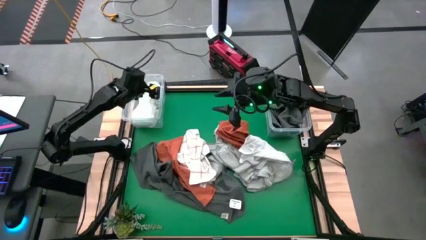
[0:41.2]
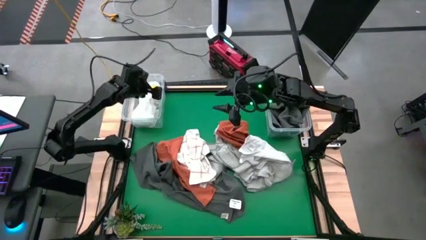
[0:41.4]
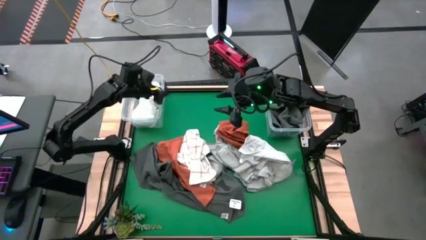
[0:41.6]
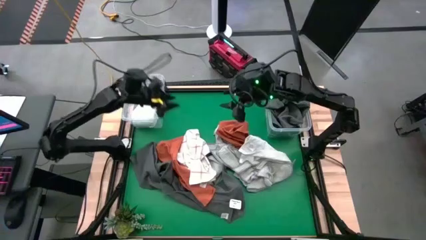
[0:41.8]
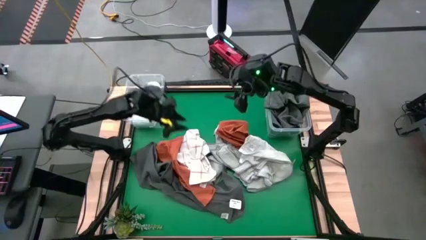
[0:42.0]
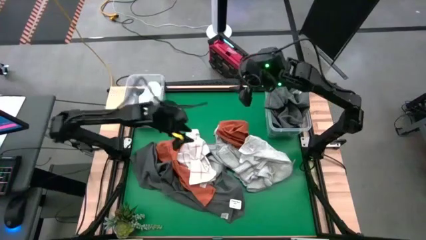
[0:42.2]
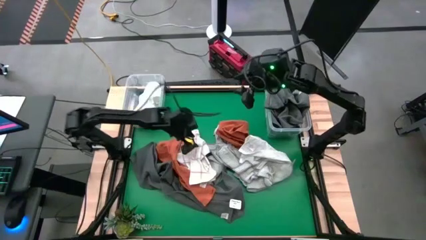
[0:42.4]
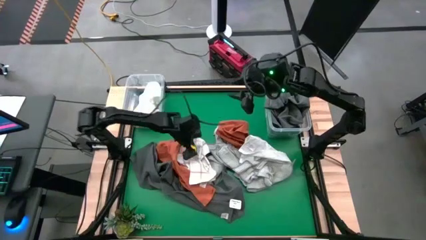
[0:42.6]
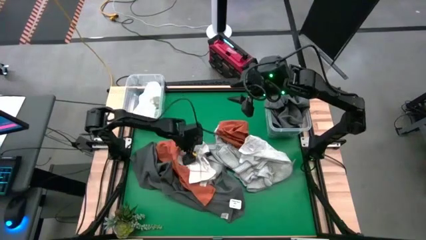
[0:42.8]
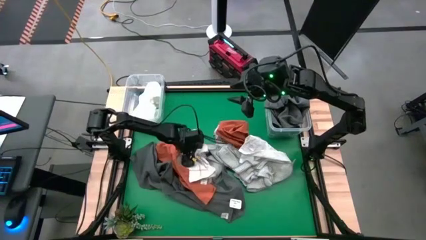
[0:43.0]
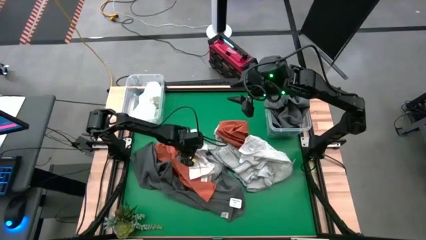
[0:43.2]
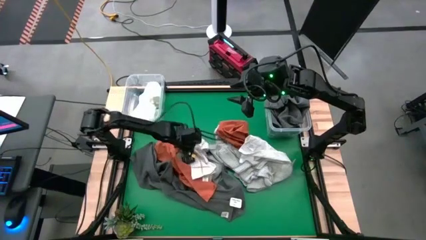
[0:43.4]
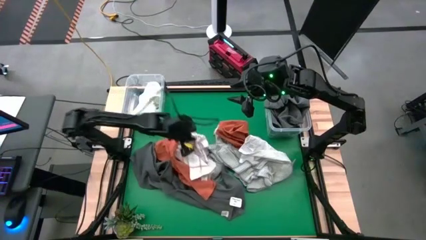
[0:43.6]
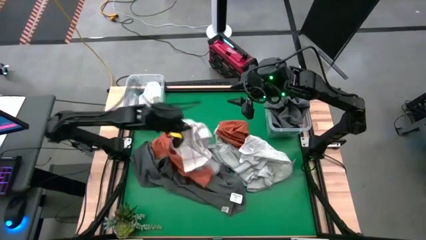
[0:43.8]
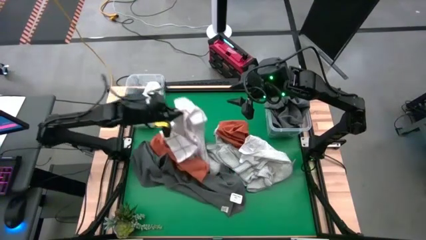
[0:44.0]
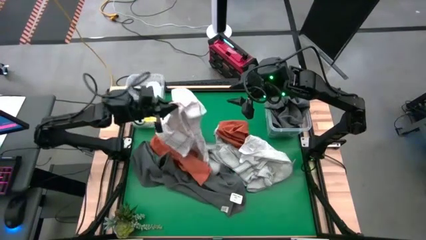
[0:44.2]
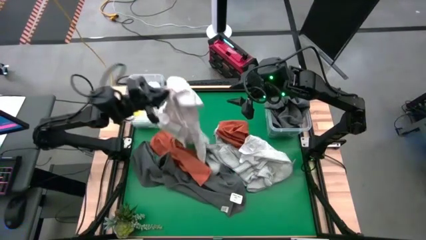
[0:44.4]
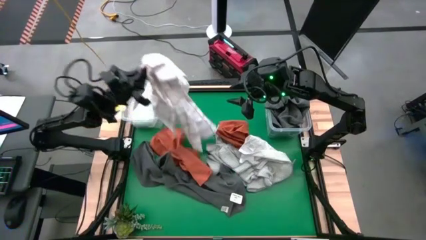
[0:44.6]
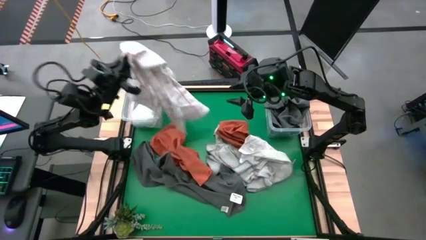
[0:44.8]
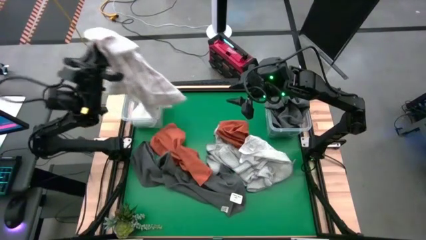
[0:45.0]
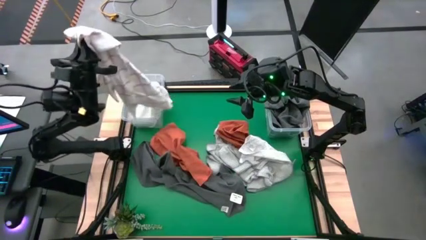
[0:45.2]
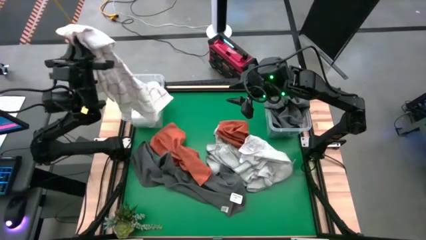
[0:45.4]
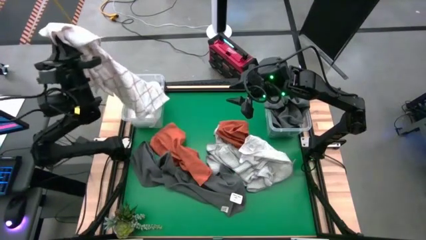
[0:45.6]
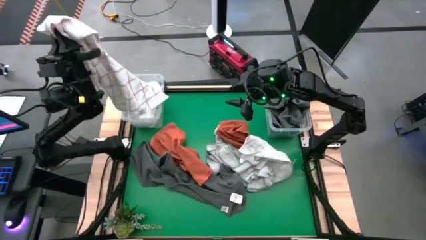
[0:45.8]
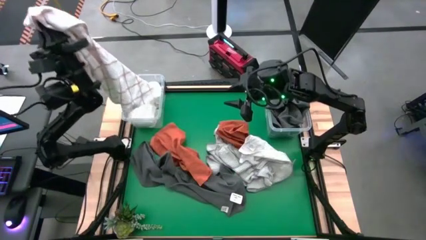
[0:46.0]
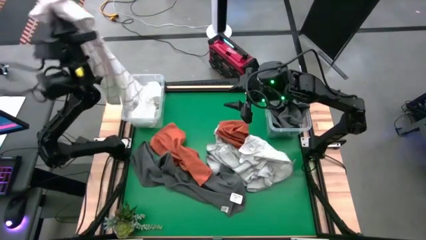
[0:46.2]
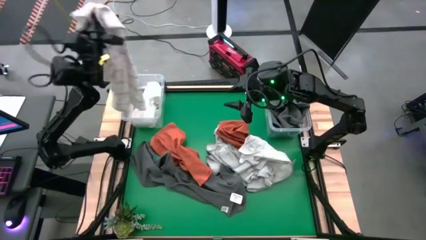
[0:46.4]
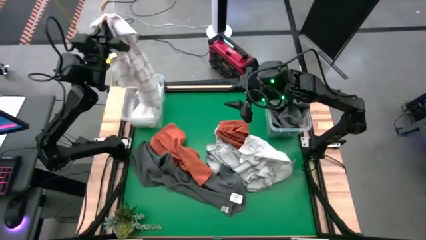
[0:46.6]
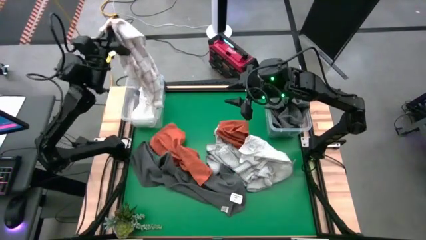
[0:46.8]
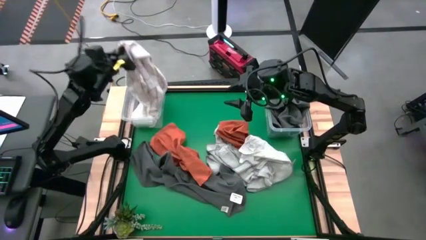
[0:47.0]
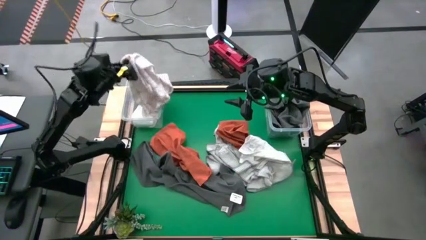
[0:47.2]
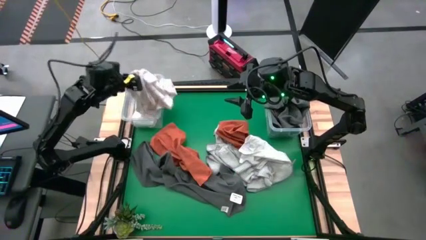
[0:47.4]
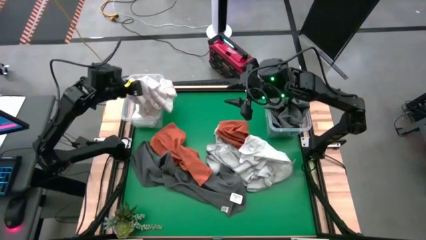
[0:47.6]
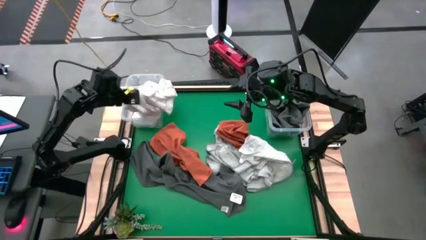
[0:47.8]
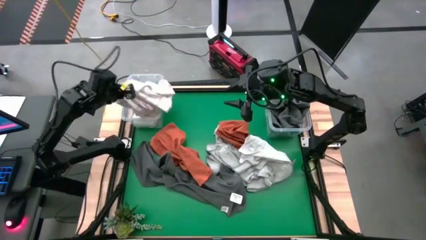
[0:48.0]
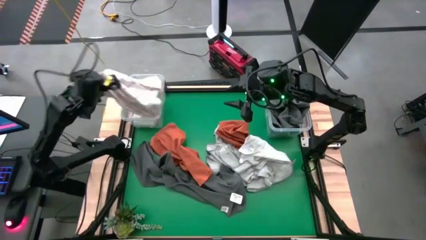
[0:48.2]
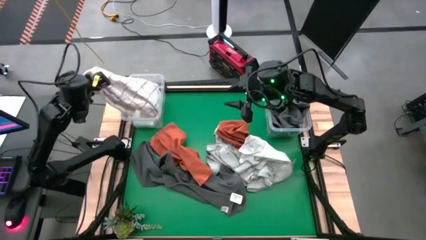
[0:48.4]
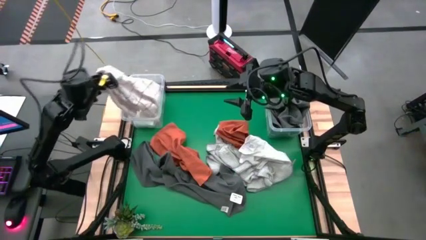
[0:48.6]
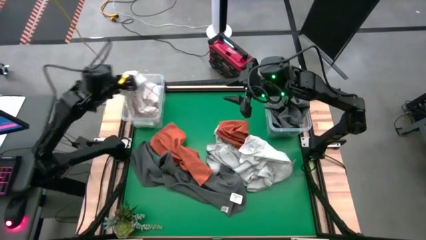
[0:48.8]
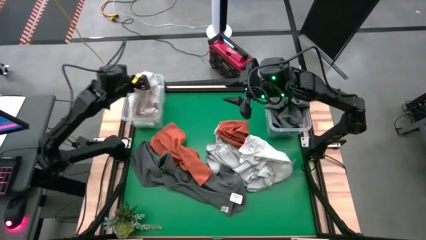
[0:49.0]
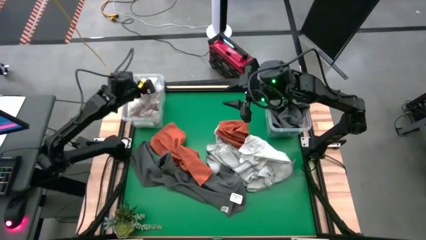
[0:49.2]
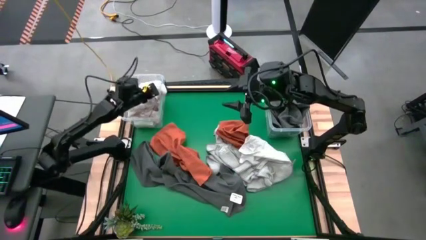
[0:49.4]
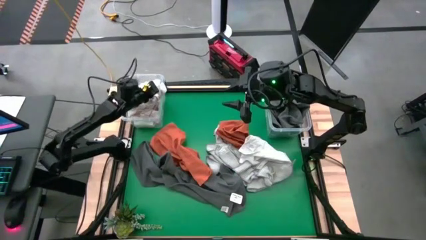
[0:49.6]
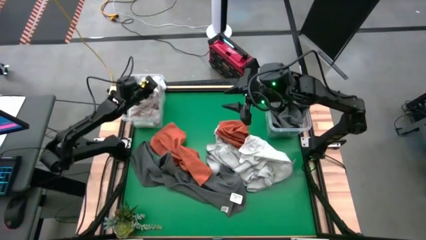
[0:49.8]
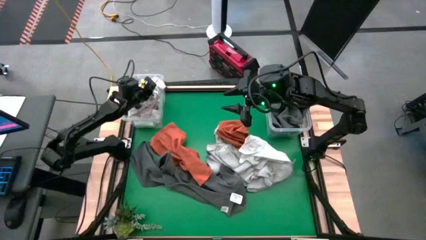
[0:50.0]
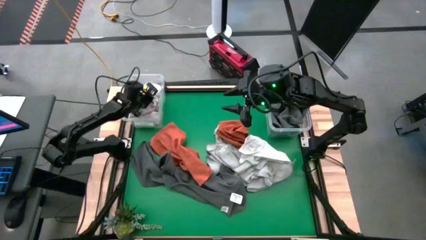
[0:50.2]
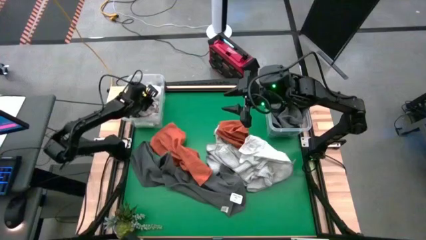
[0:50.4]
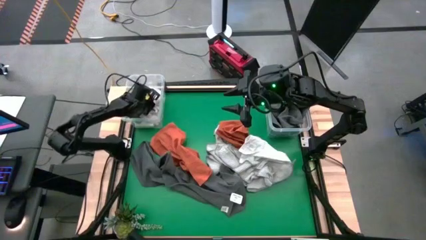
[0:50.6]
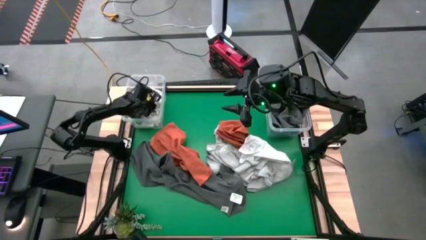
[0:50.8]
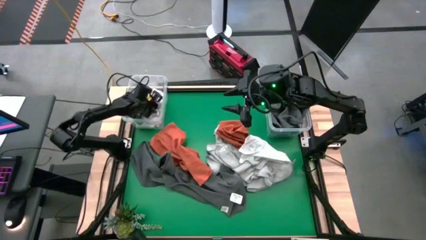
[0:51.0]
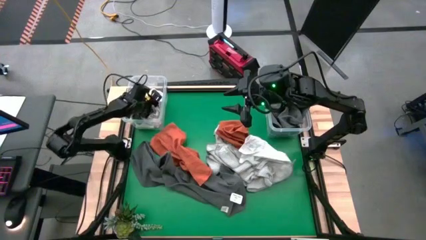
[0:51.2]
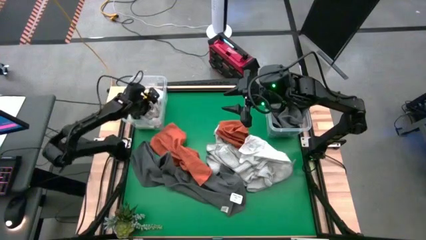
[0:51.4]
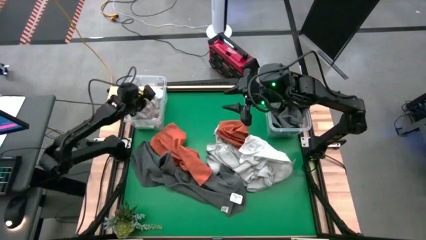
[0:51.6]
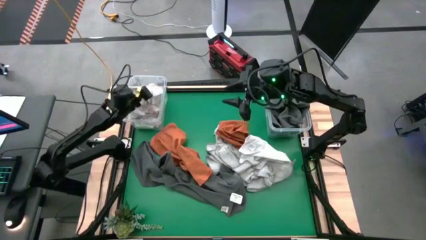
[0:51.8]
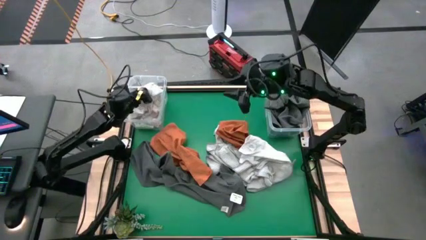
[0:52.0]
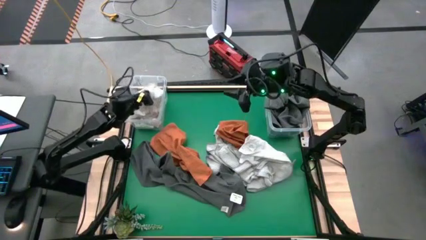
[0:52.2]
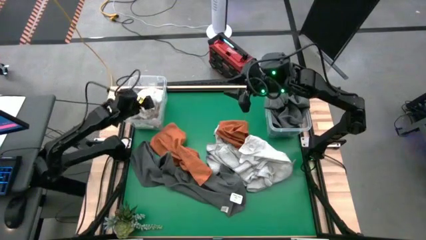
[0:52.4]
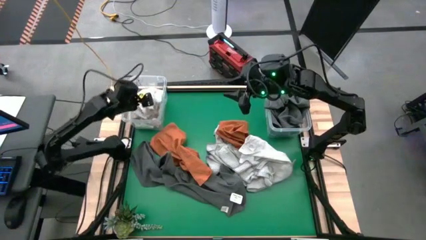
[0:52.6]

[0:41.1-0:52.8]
Task: Sort towels by color in basket
Put the white patterned towel into the left transparent bin

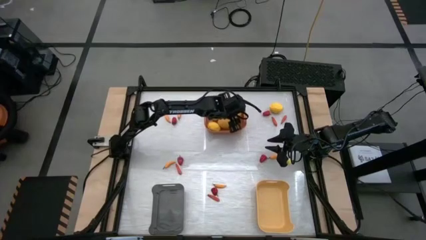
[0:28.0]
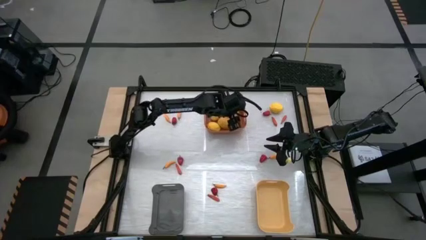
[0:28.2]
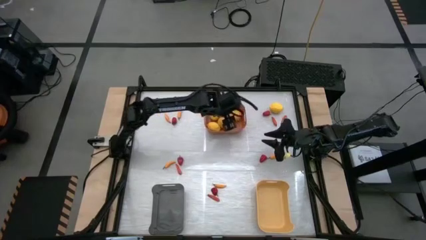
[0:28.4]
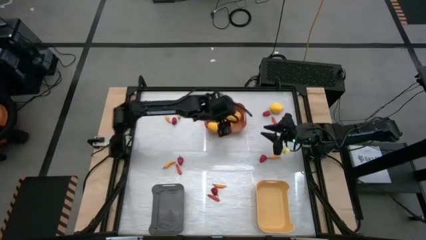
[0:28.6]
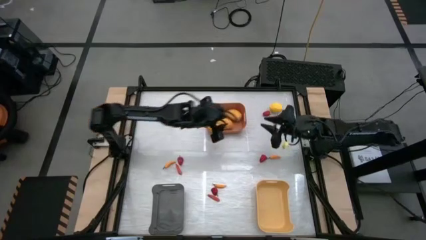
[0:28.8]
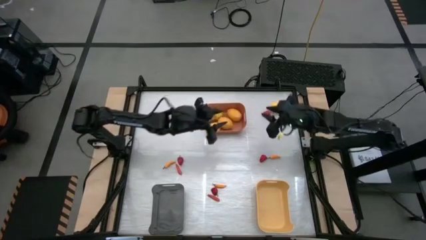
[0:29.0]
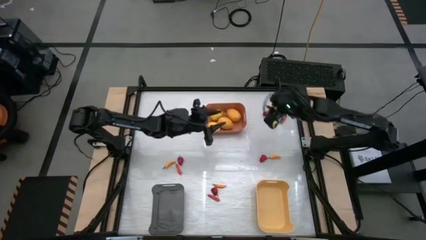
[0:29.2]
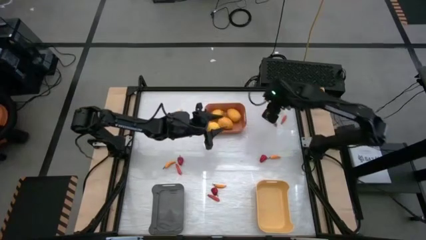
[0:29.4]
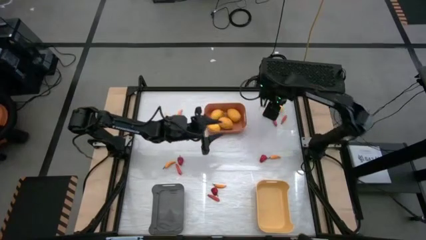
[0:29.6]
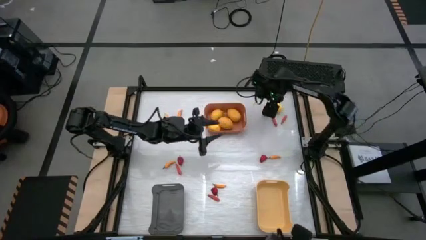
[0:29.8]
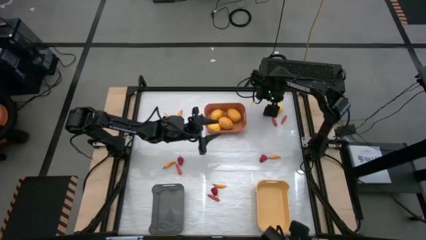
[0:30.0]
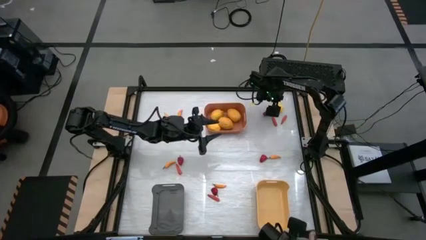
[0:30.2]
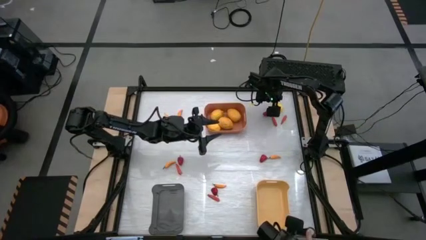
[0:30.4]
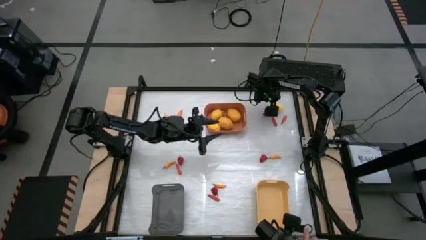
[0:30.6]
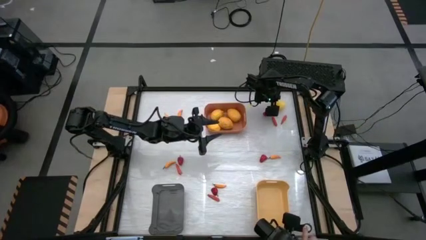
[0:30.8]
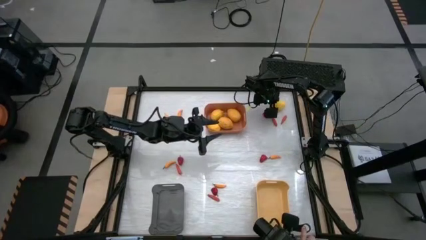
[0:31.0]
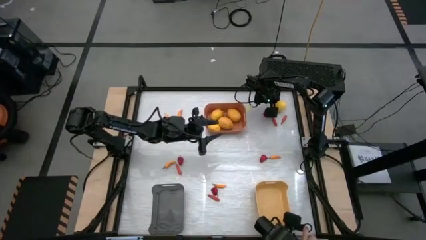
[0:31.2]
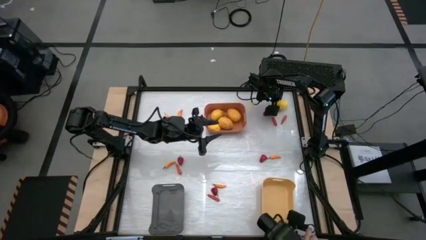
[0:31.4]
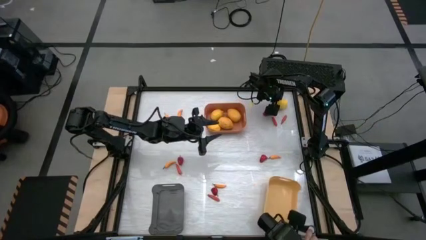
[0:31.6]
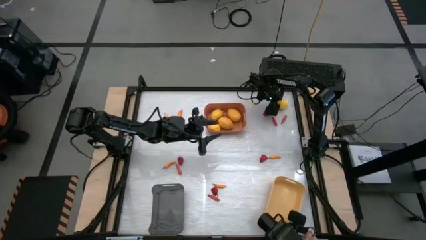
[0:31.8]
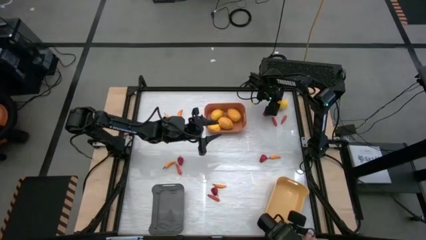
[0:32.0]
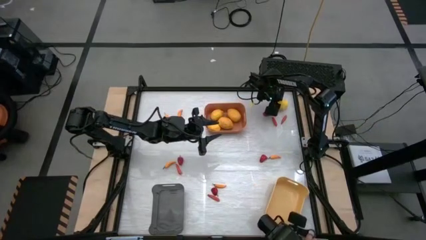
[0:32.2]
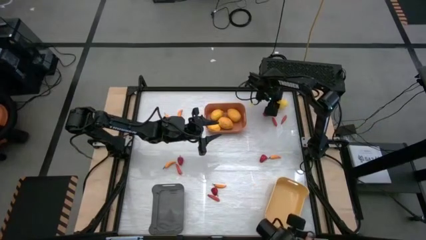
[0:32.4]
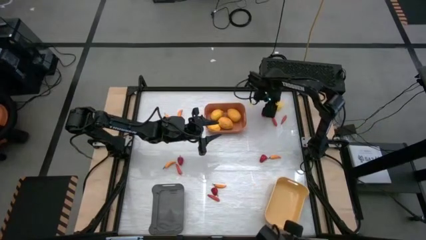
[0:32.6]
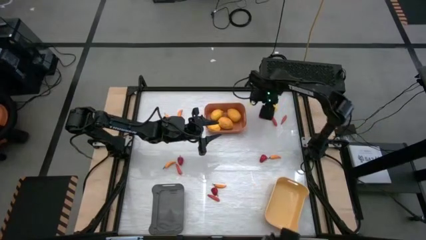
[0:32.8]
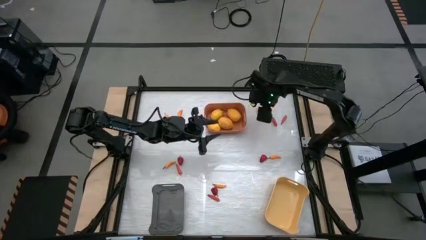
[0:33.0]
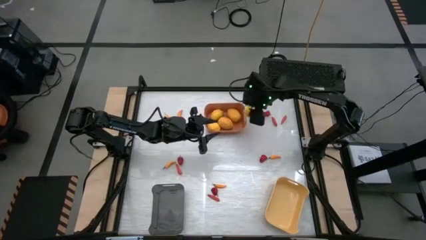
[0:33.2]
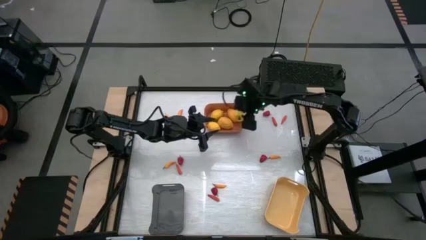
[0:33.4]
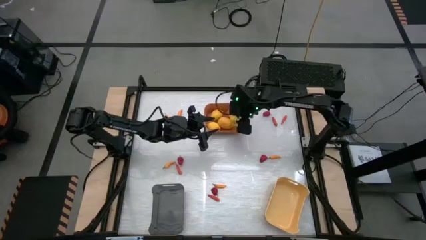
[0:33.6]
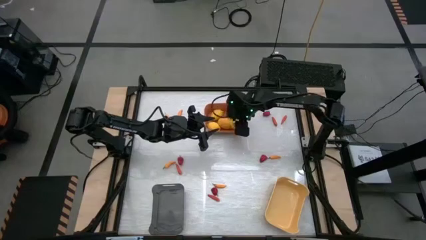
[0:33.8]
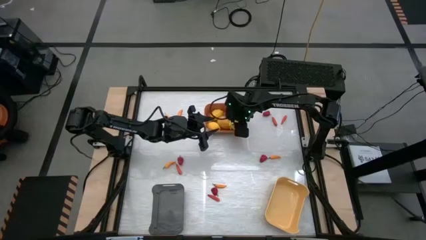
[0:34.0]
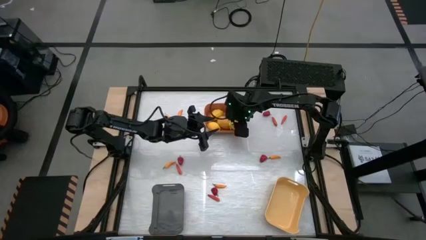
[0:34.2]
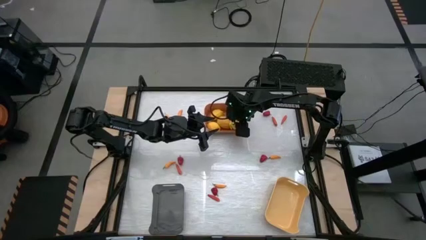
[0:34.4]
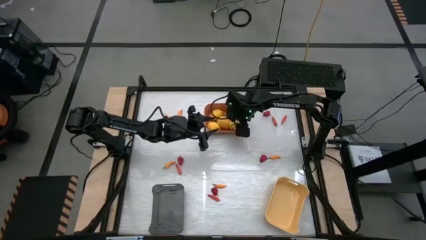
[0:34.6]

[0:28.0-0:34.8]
Task: Sort produce into baskets
Put the yellow lemon into the orange bin
